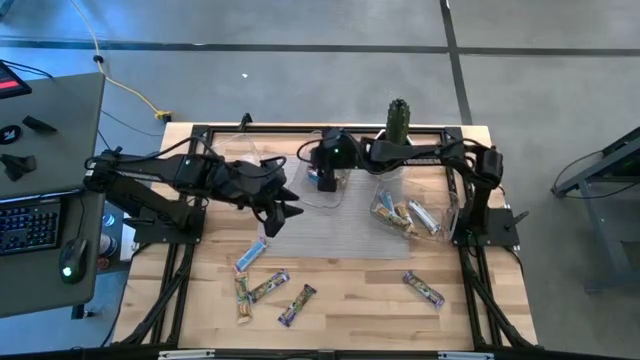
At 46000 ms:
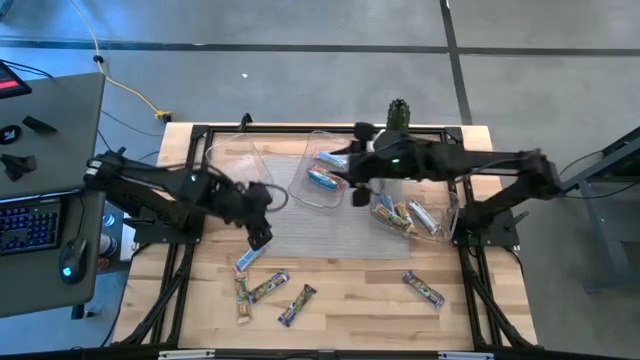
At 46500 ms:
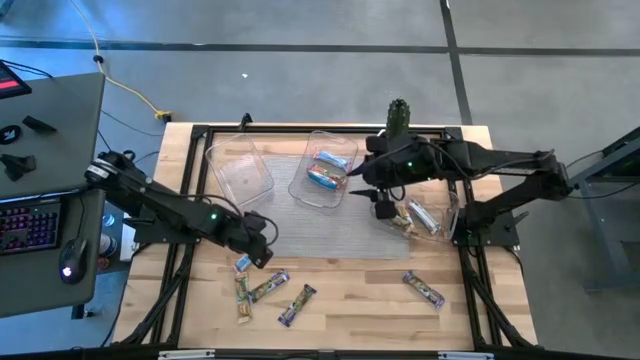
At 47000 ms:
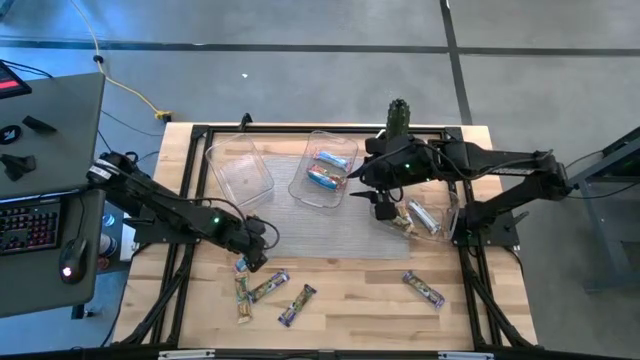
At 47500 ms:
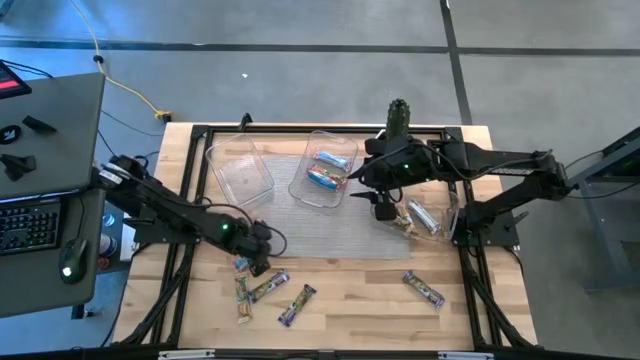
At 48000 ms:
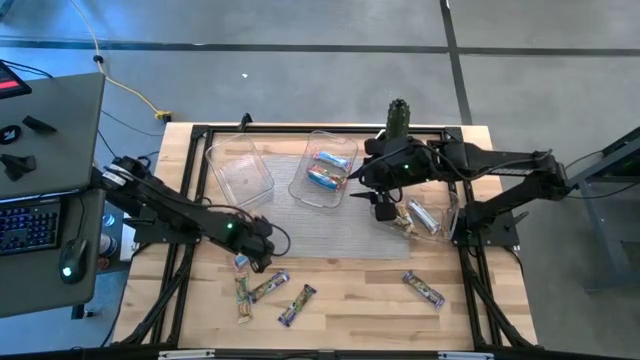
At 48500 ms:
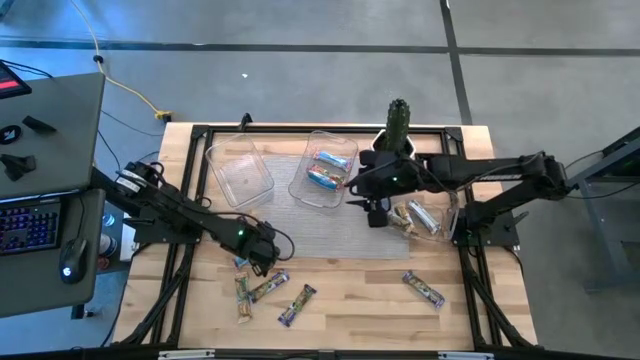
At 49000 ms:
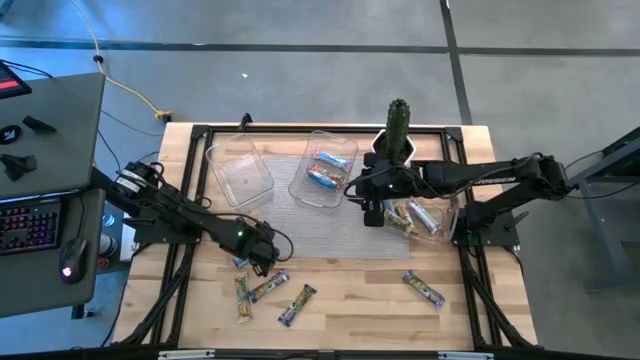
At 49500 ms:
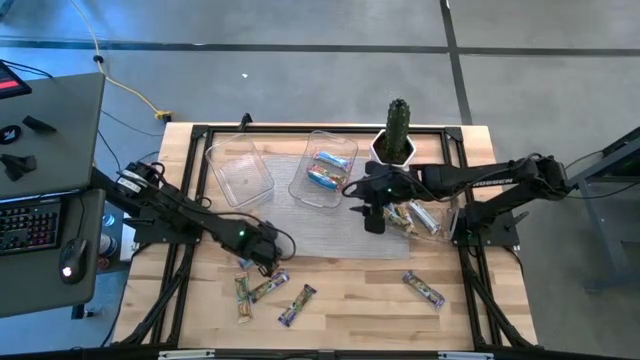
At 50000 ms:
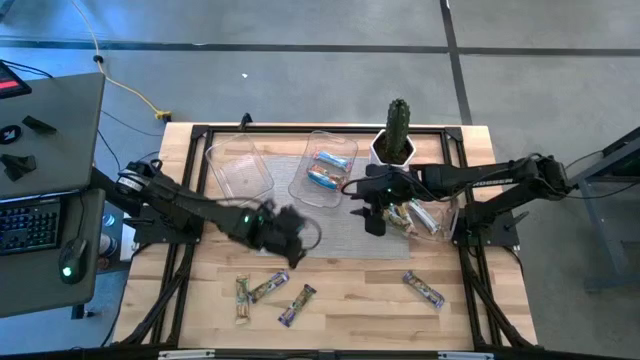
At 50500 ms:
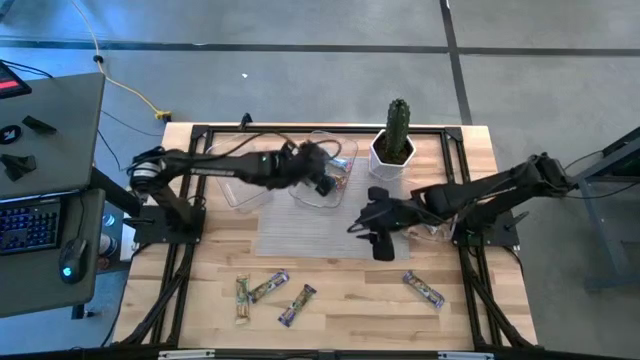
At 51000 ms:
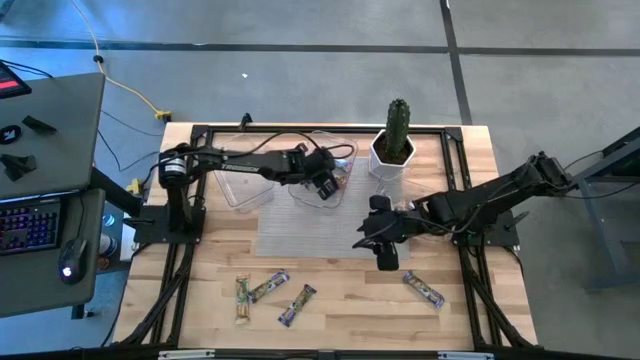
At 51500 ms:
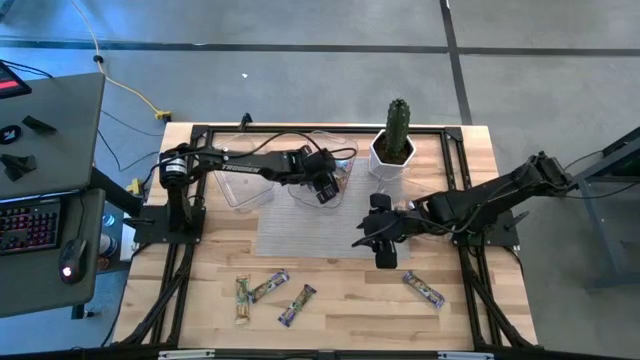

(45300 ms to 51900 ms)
Task: Pick and place Granola Bars by type
Put the red granola bar into the middle transparent bin

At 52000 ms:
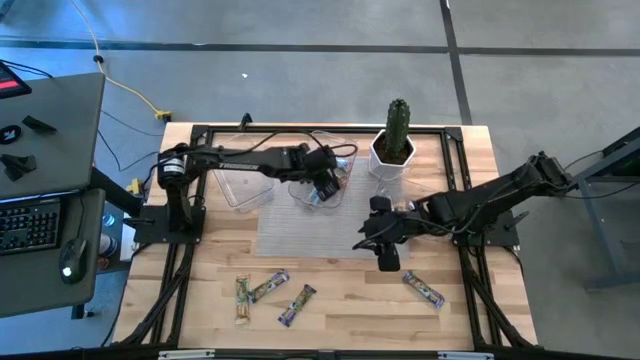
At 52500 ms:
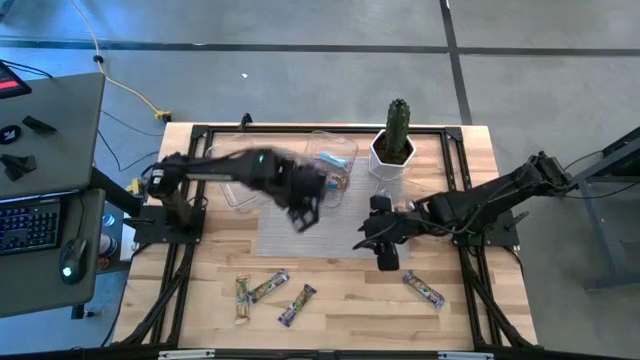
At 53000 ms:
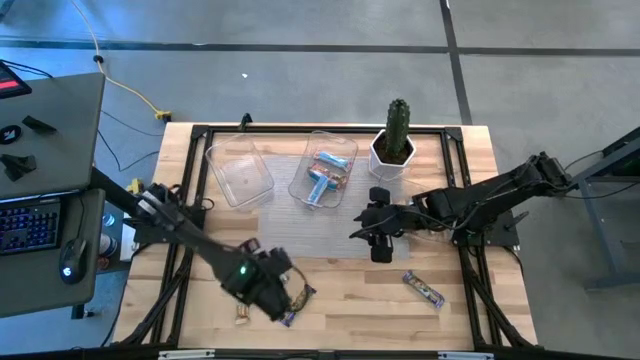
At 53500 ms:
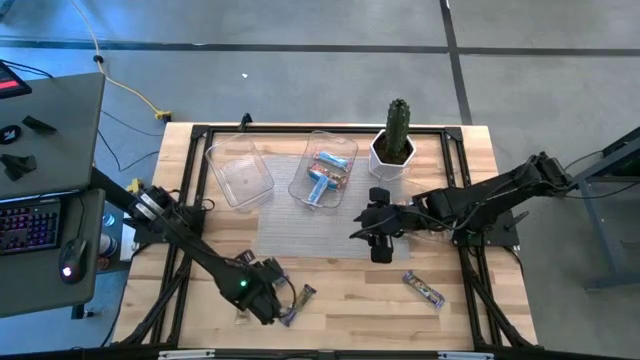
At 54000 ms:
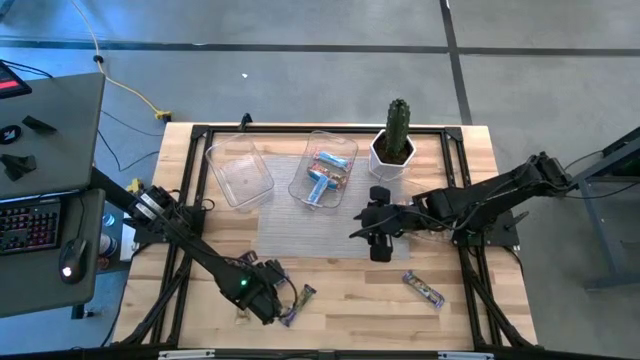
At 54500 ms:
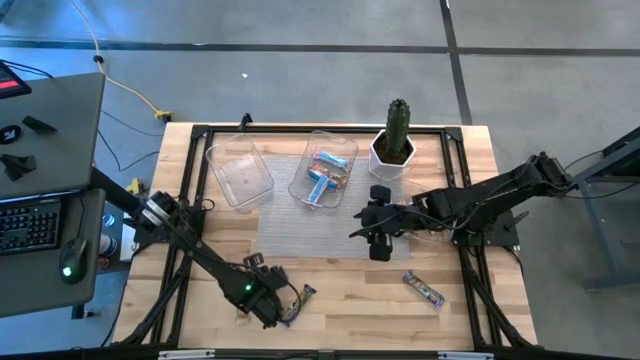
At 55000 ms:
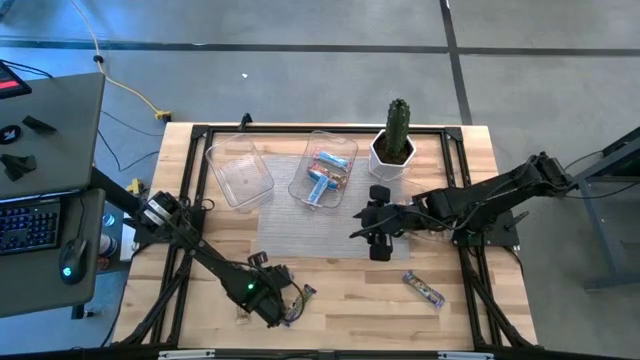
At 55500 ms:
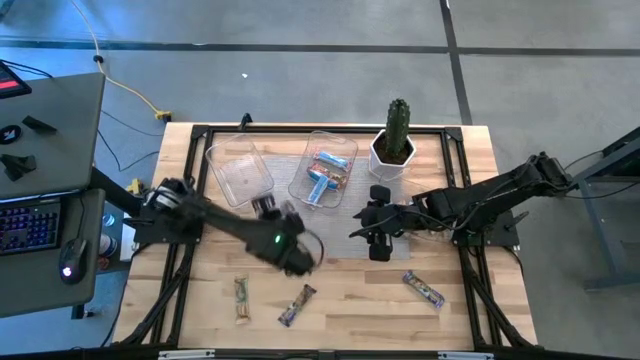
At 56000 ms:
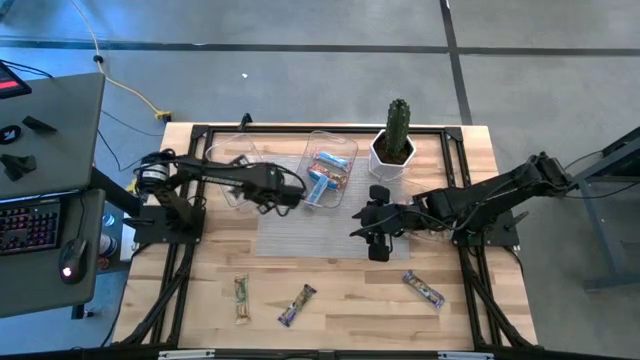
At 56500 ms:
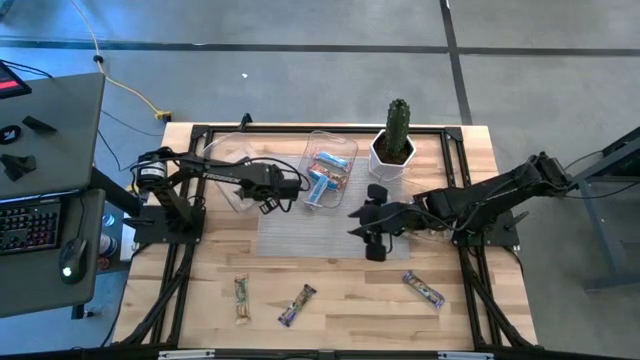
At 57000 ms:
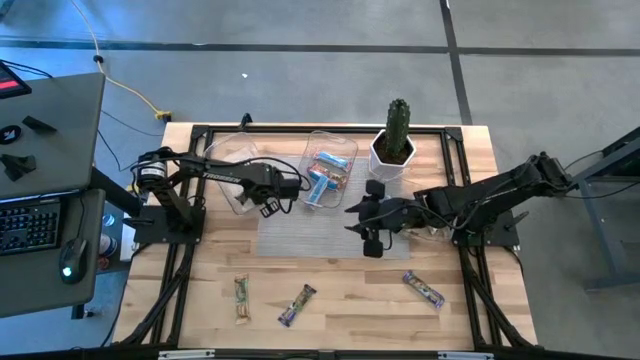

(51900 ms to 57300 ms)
Put the blue granola bar into the left transparent bin

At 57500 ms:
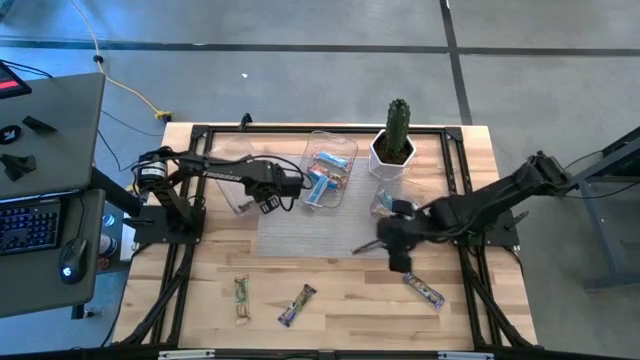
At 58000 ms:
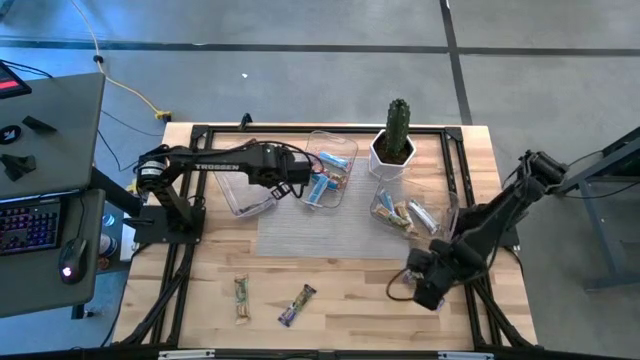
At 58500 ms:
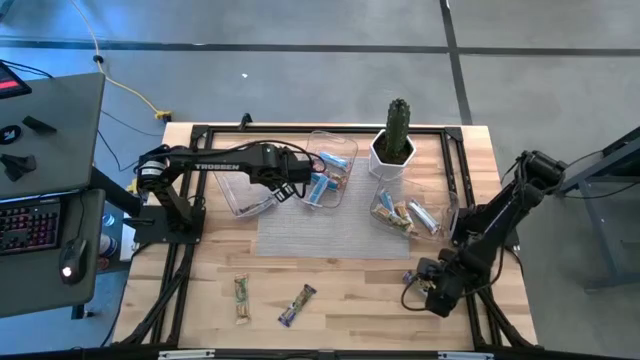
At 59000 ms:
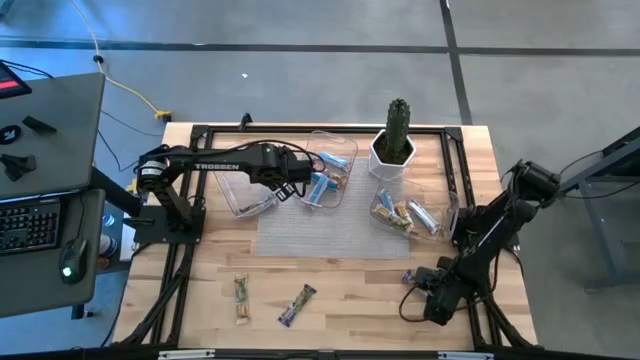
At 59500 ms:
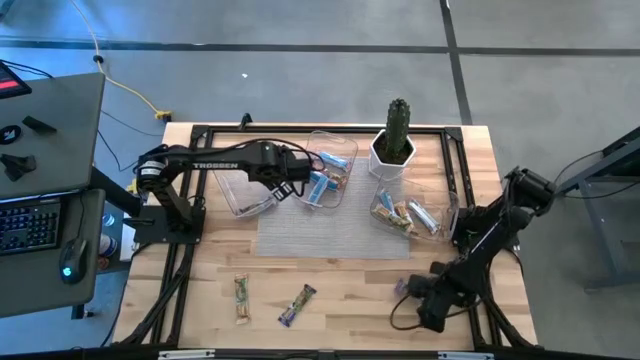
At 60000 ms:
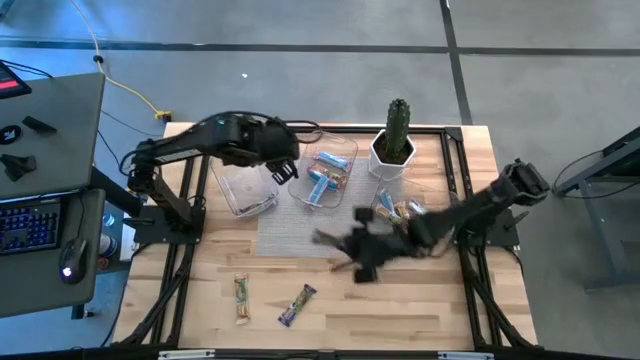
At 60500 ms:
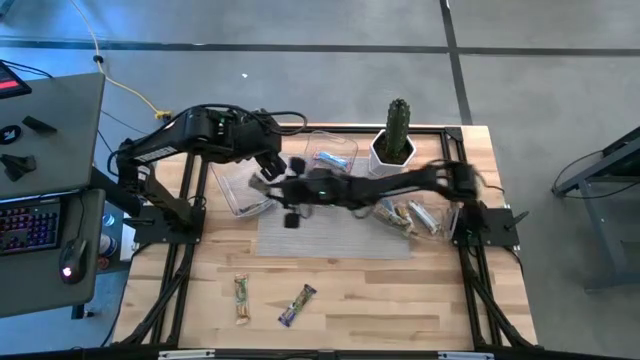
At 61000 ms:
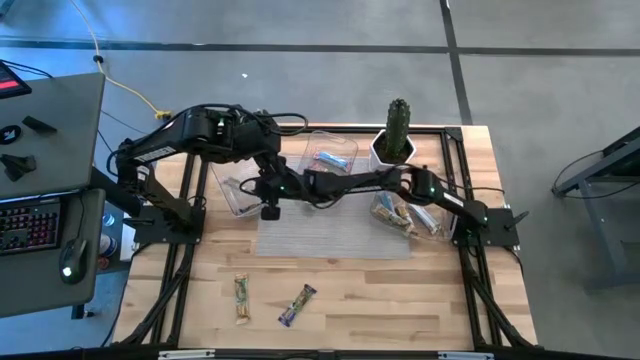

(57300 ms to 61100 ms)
Put the blue granola bar into the left transparent bin

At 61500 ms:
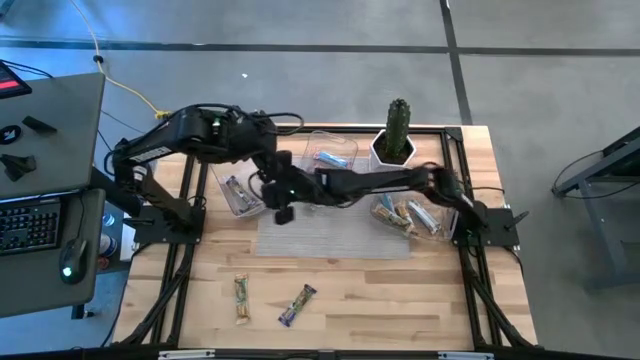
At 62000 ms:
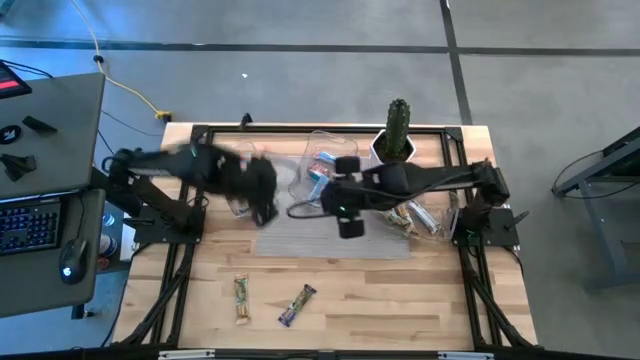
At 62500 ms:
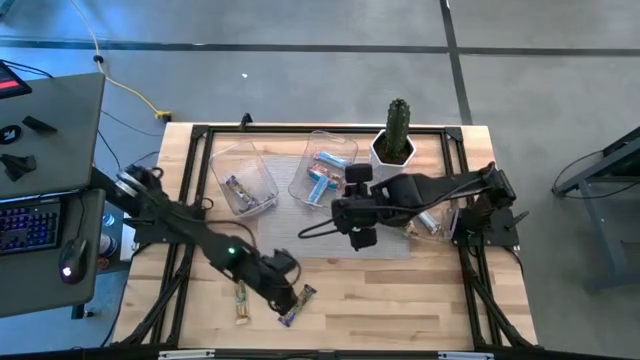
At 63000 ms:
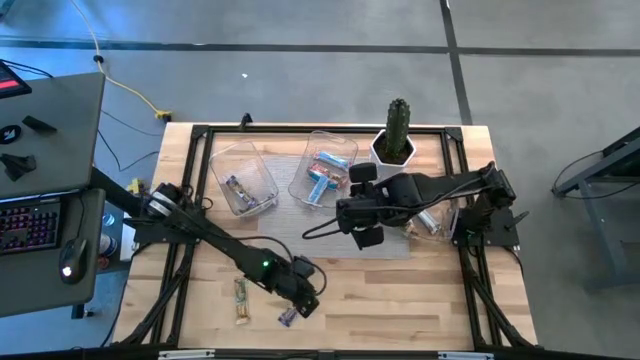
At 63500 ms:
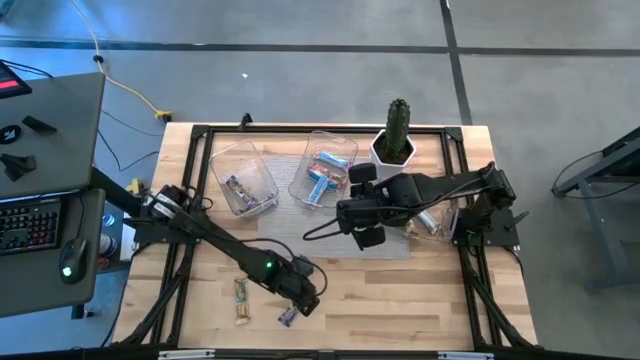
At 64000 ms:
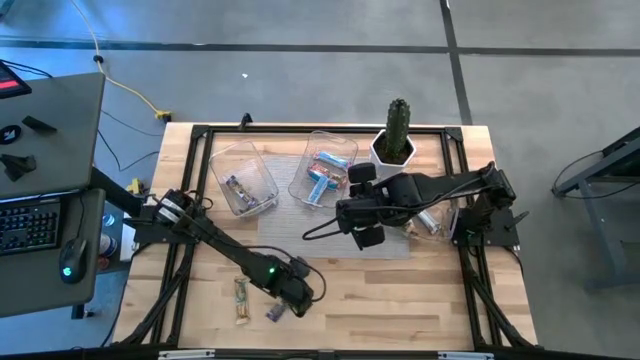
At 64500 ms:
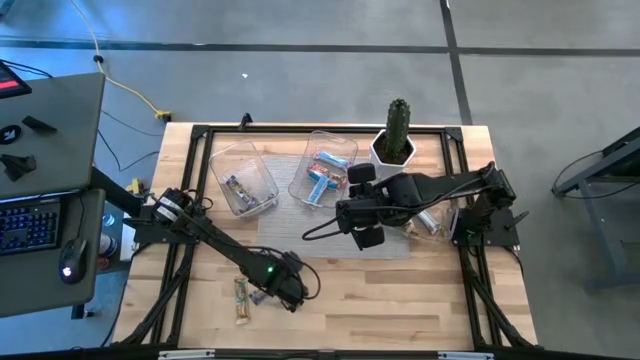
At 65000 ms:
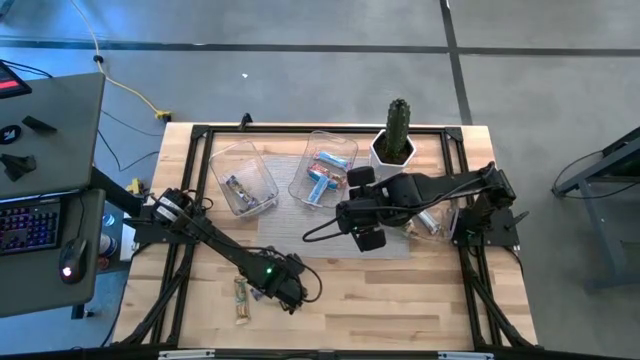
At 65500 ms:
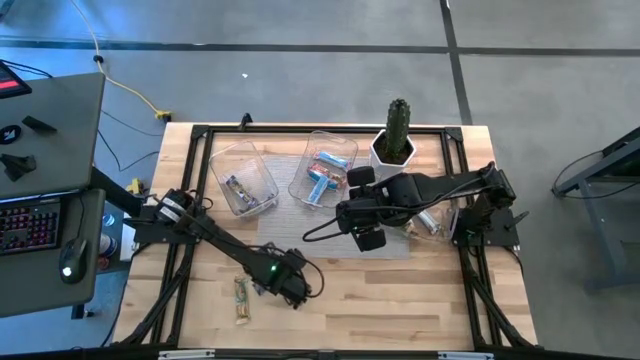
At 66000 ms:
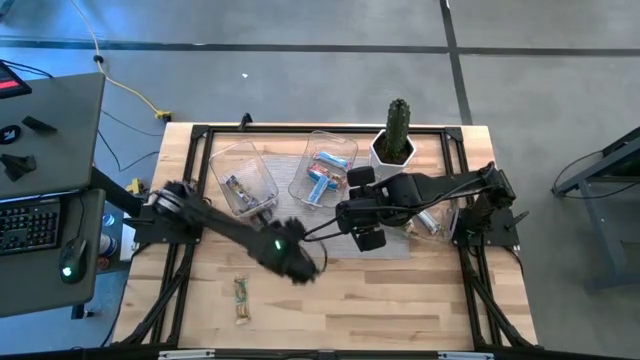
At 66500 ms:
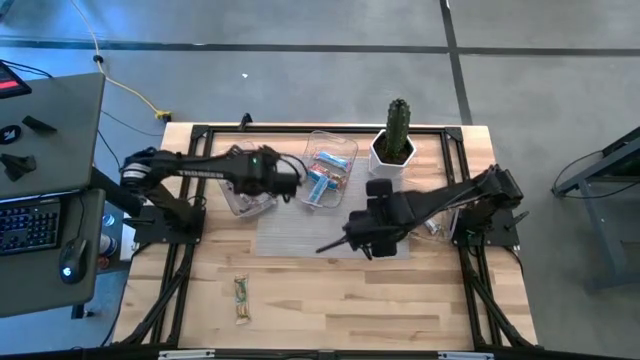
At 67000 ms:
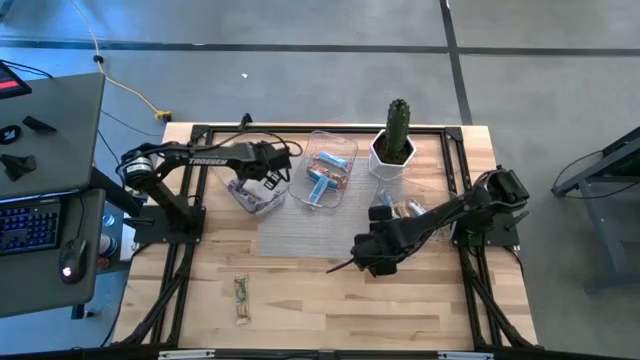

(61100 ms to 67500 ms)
Put the blue granola bar into the left transparent bin
